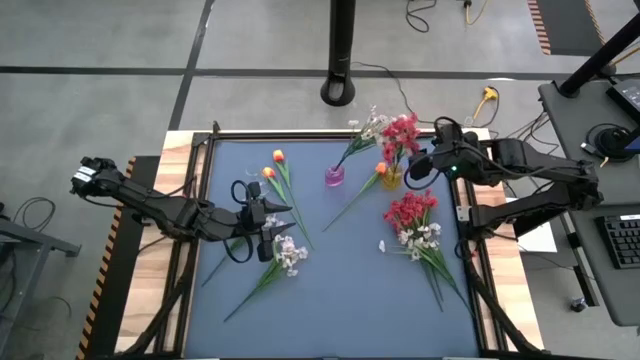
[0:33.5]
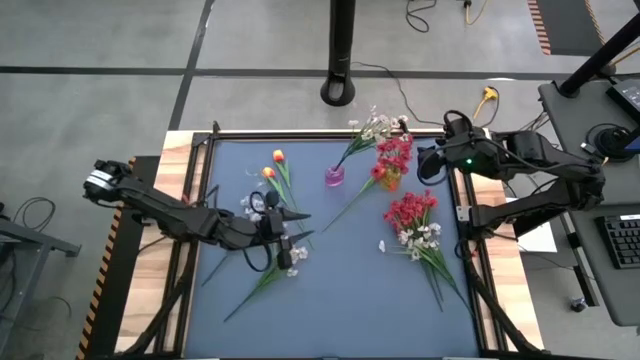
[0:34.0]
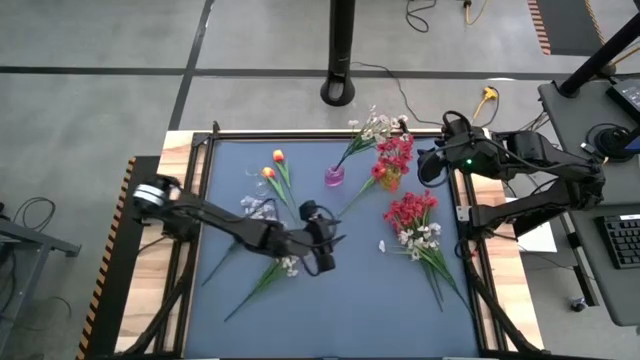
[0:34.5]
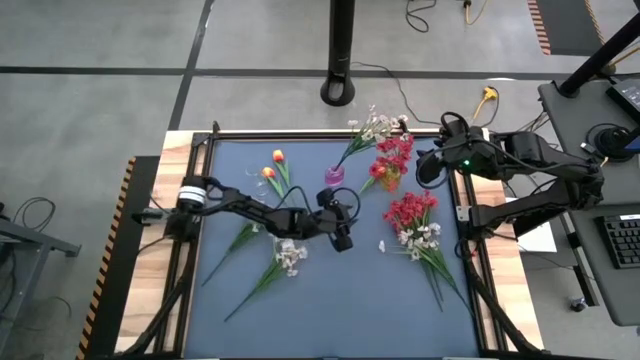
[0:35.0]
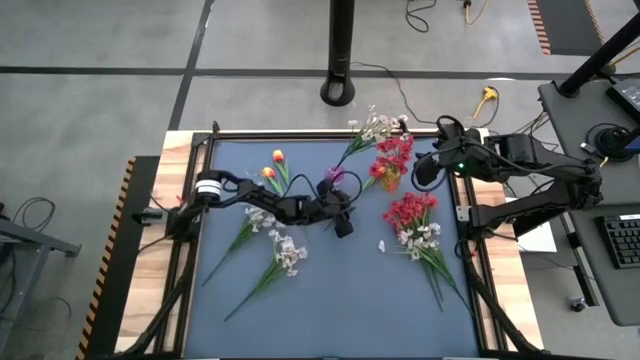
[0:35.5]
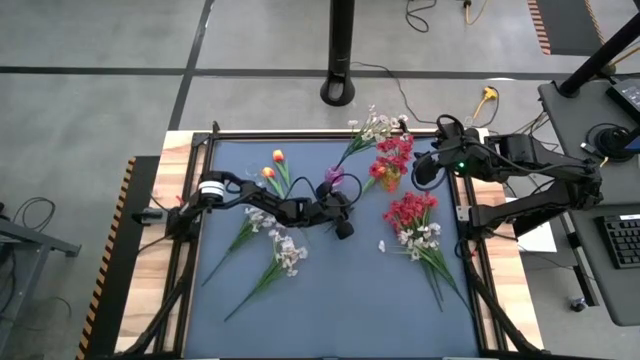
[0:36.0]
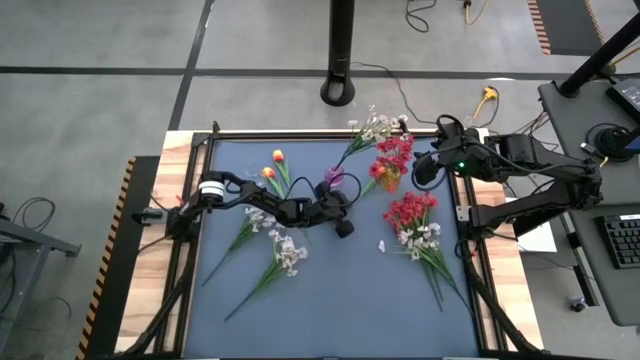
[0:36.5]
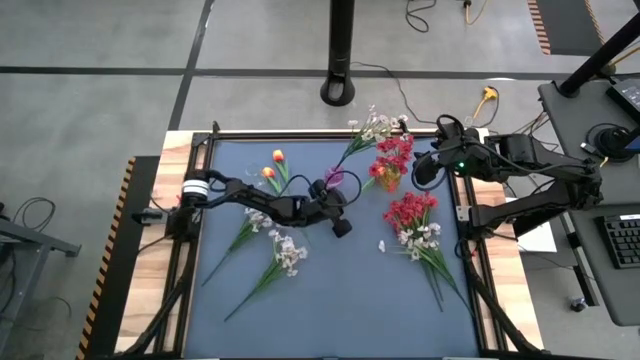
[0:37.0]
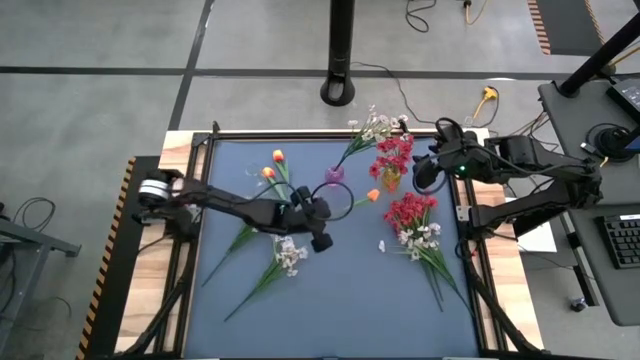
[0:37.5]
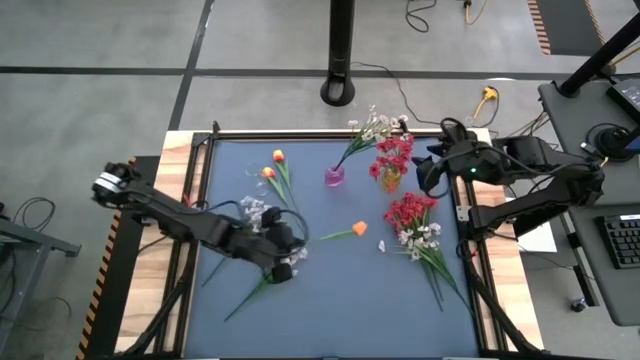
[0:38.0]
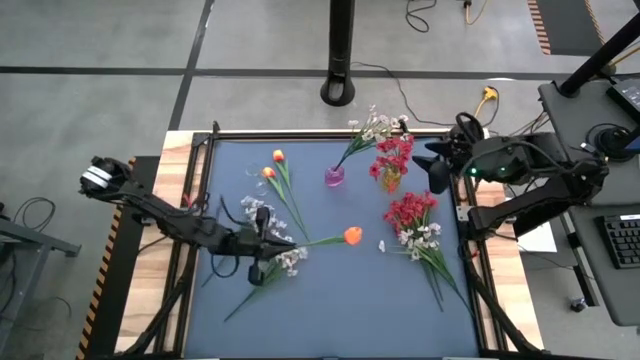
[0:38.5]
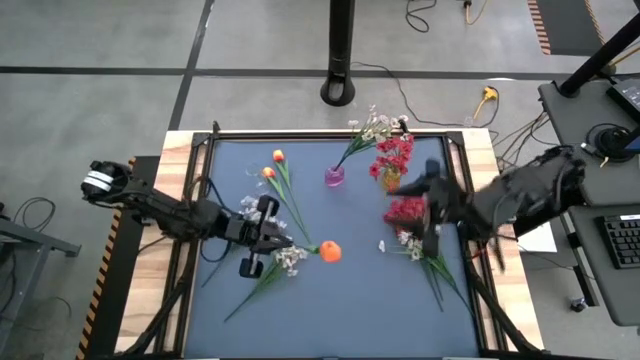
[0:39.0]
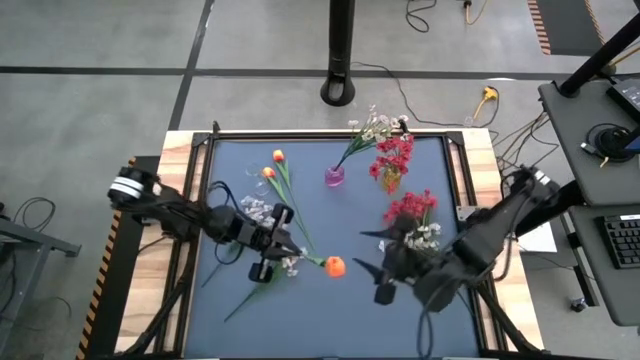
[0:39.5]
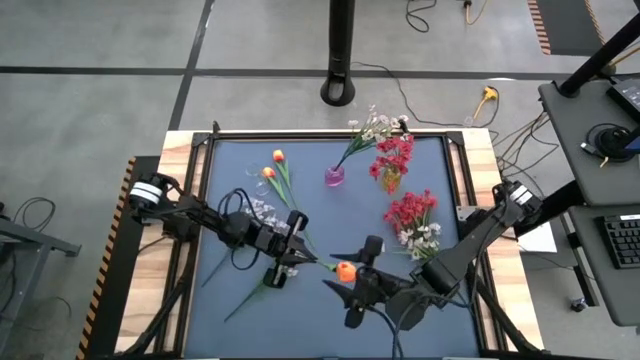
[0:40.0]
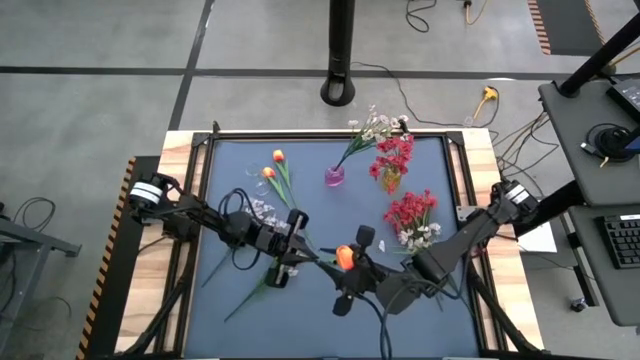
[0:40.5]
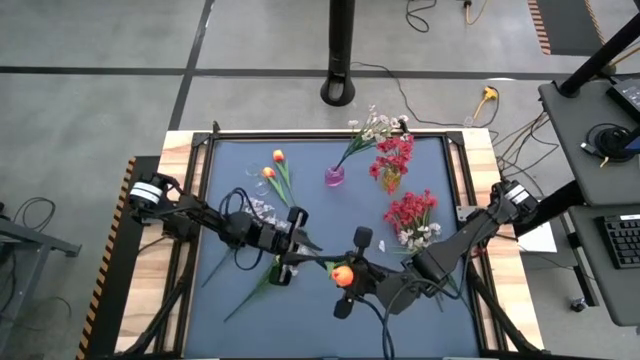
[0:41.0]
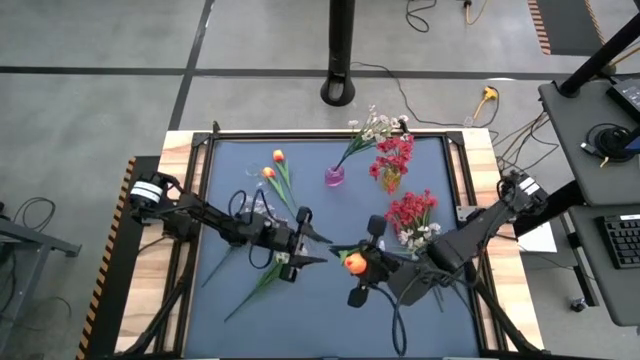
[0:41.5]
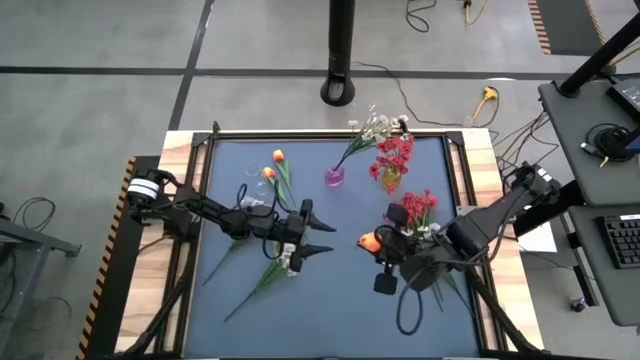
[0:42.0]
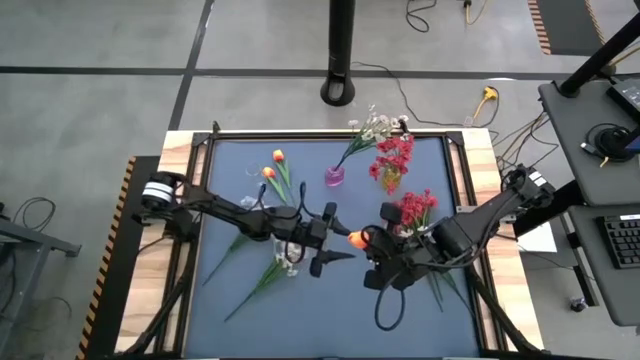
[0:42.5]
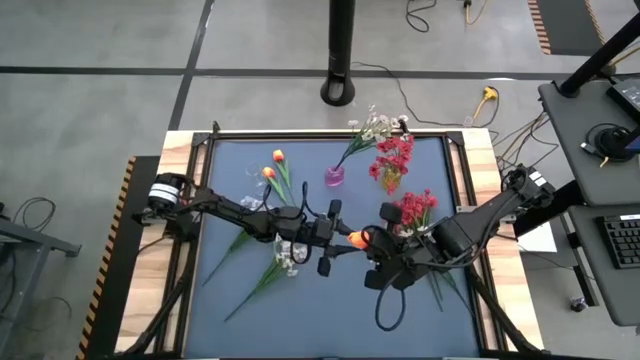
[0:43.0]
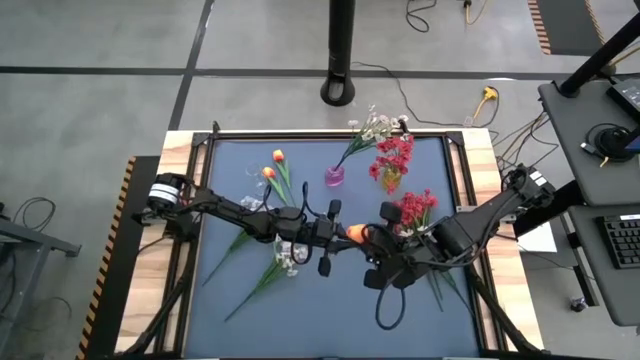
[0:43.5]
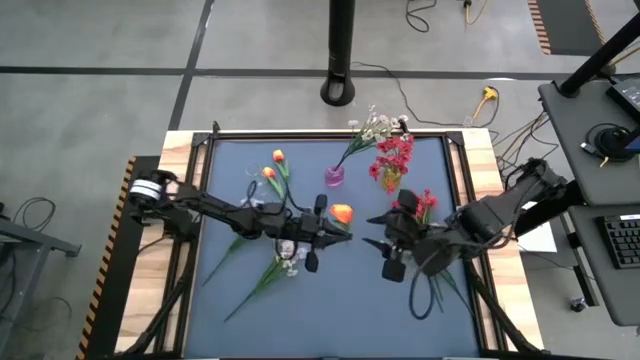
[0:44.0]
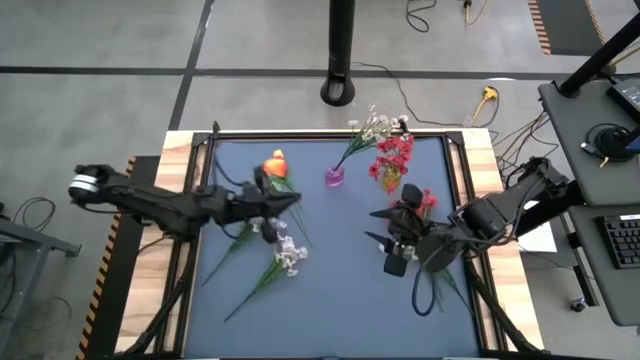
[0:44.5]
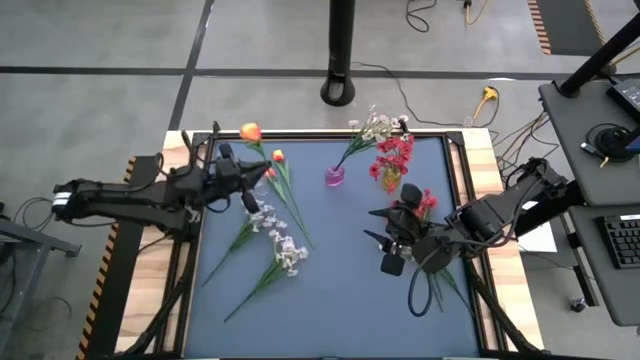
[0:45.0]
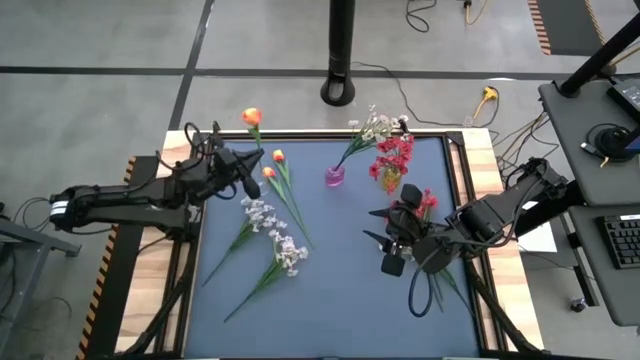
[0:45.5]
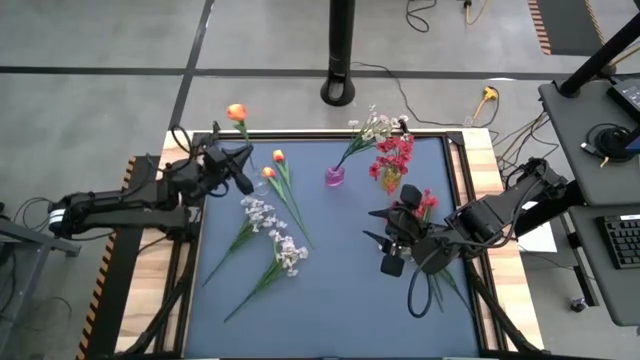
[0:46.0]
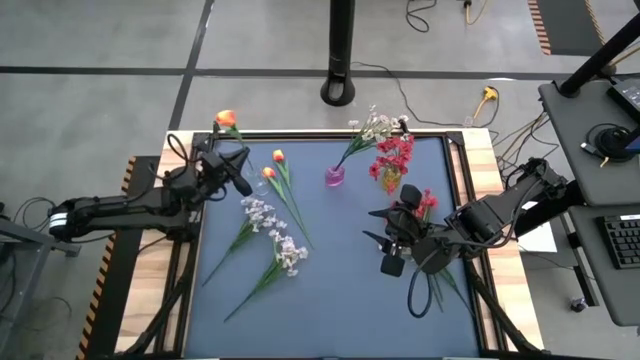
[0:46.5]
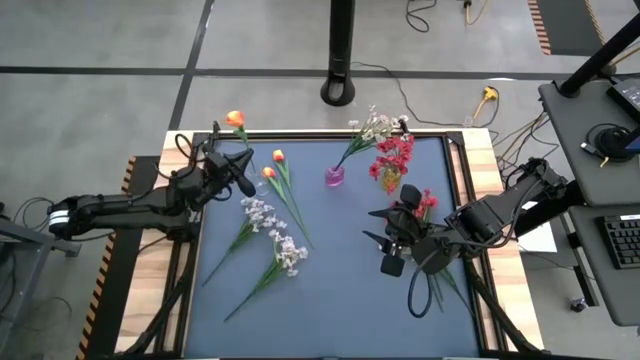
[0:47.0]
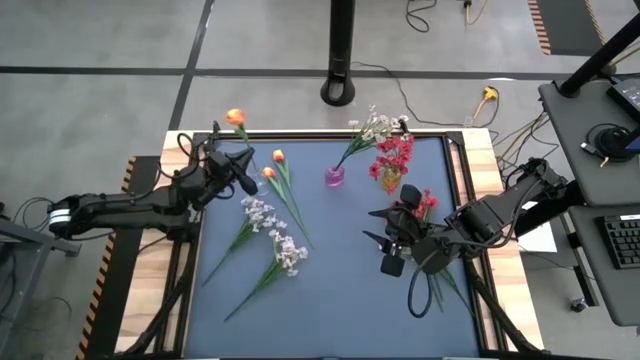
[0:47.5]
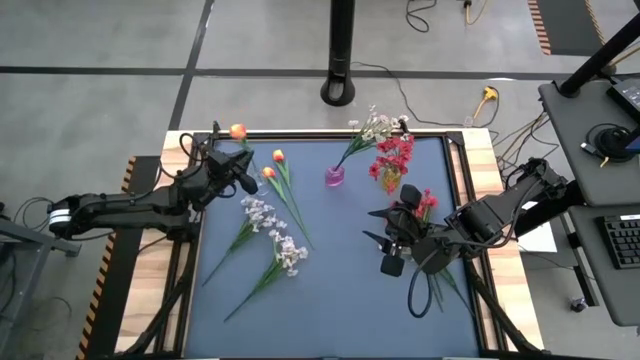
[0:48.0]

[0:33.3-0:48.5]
Task: Sort flowers into vase by color
Put the orange tulip into the transparent vase

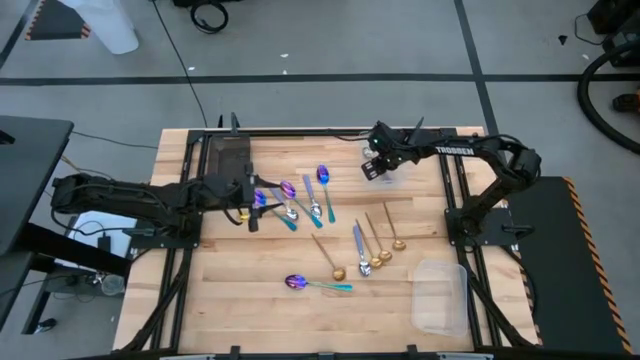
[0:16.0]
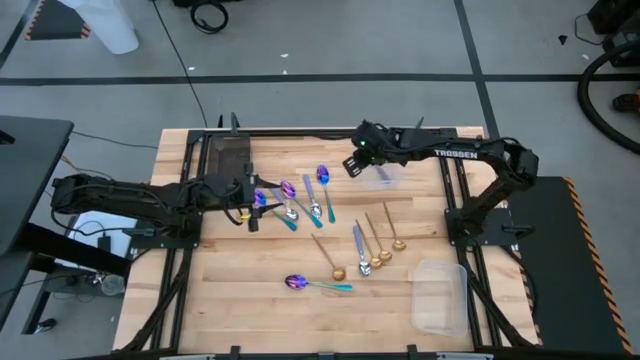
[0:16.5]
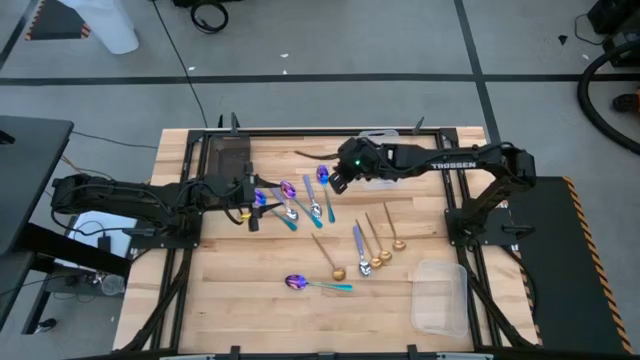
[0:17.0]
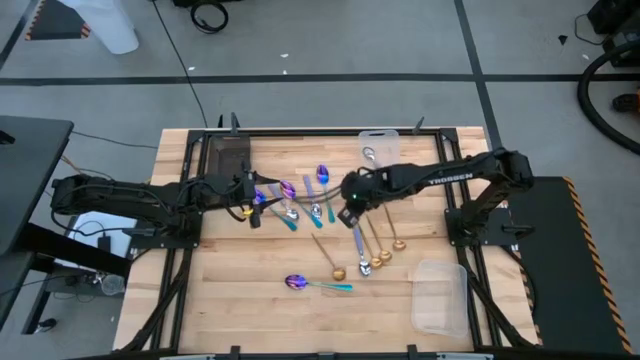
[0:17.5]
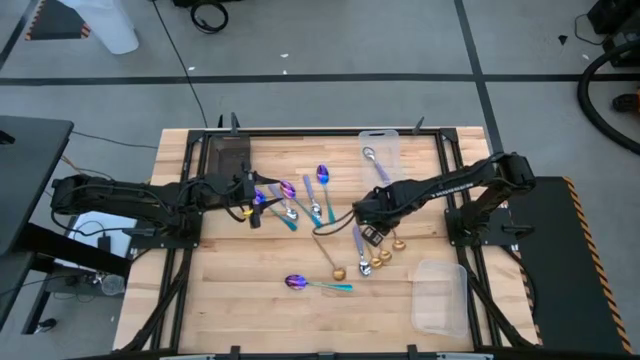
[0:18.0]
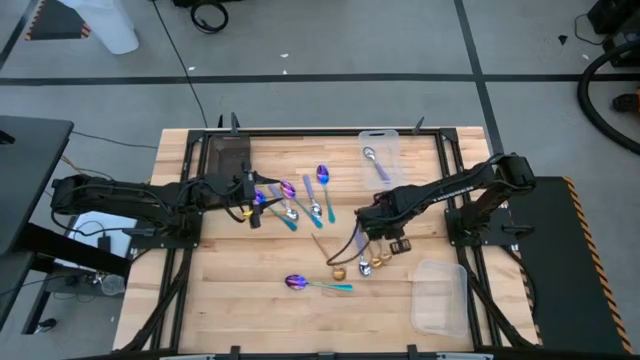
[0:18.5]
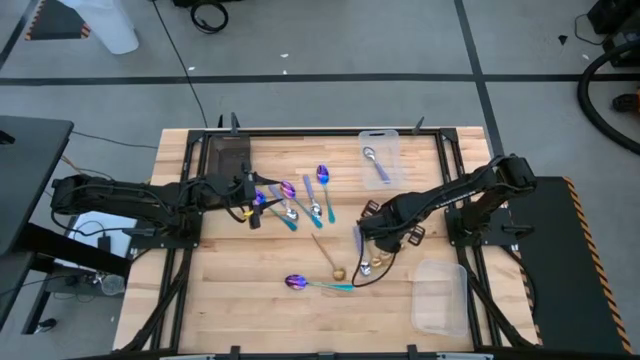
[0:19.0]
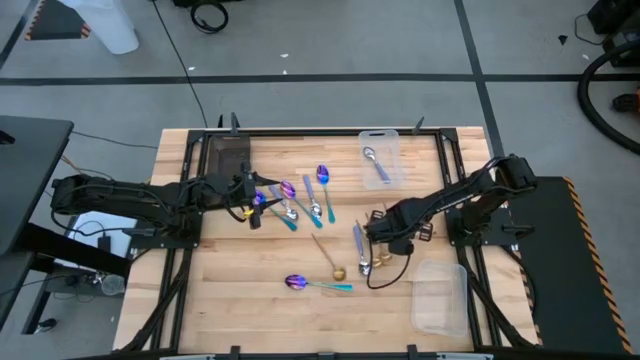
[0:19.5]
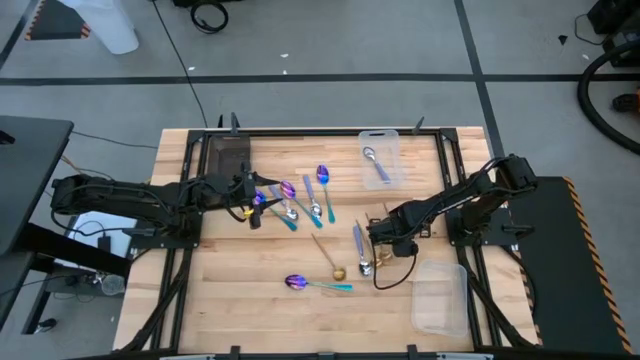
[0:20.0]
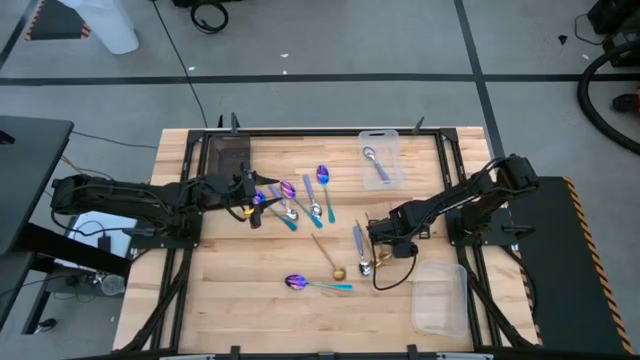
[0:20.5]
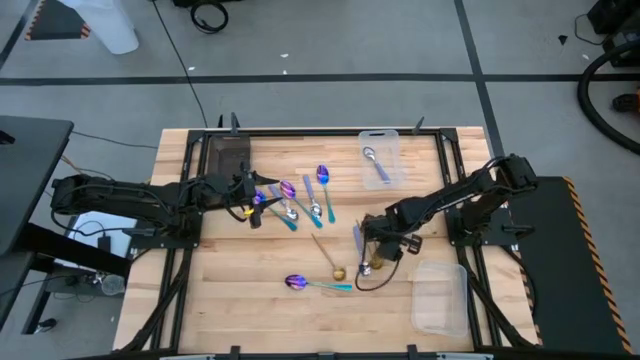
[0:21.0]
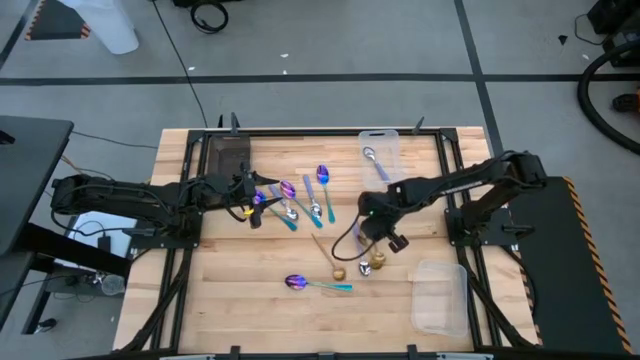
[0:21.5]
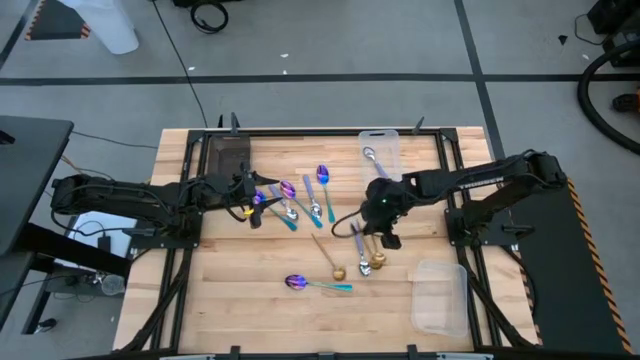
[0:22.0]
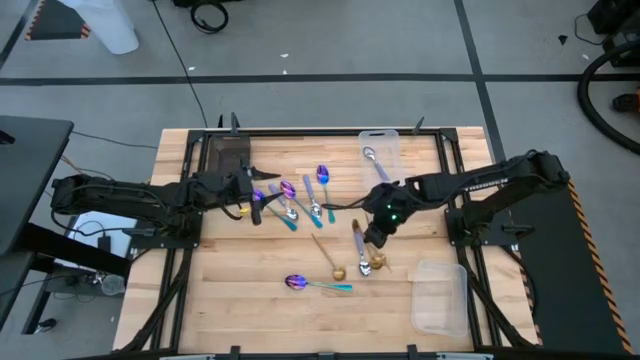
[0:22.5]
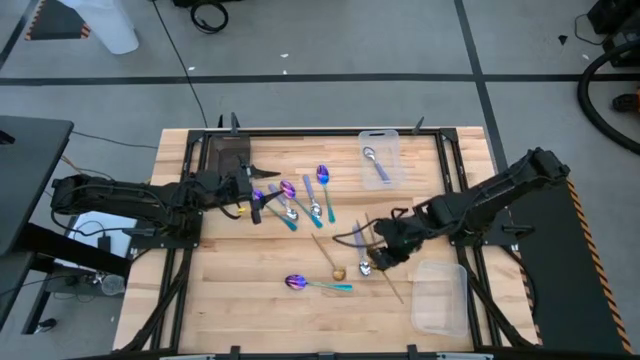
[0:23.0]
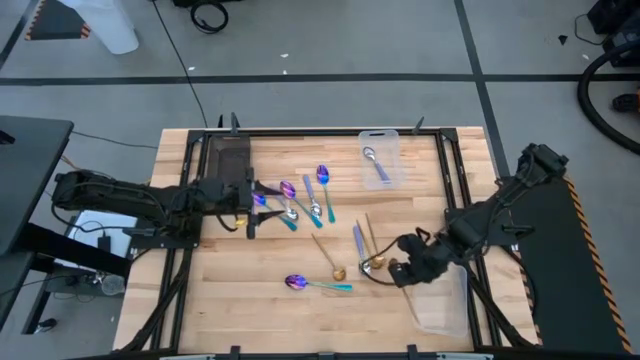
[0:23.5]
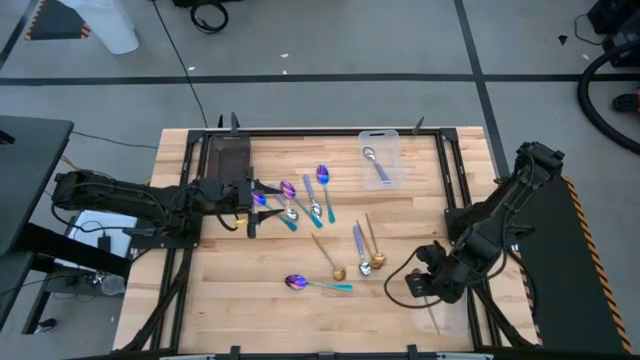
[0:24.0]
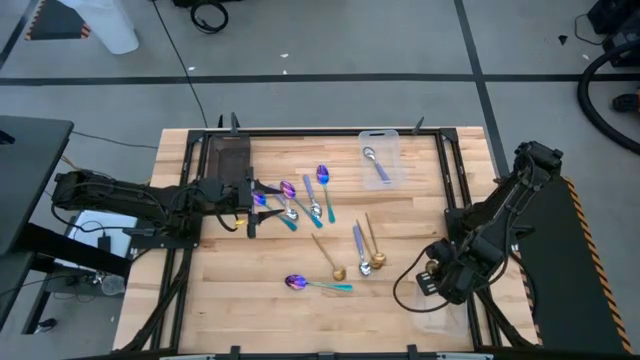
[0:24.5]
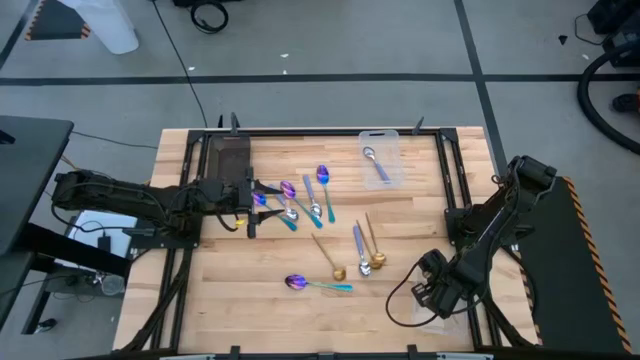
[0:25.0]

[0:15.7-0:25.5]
Task: Sort silverware by color (type)
Put the gold spoon into the bottom transparent bin
